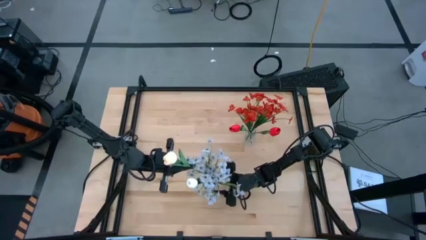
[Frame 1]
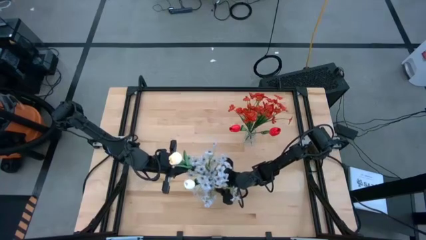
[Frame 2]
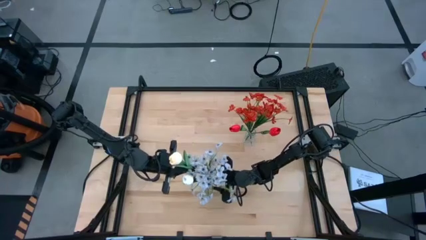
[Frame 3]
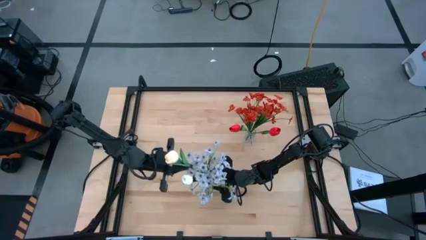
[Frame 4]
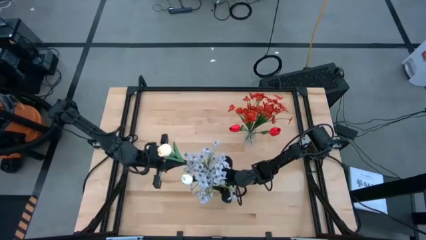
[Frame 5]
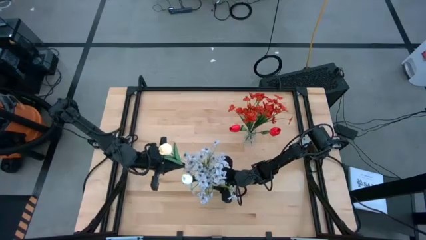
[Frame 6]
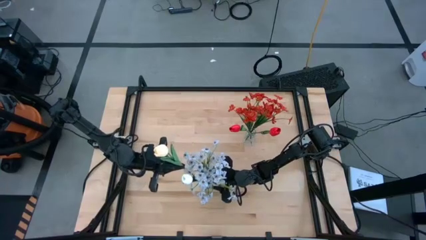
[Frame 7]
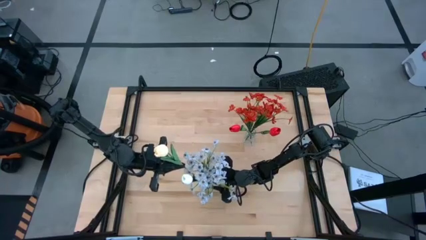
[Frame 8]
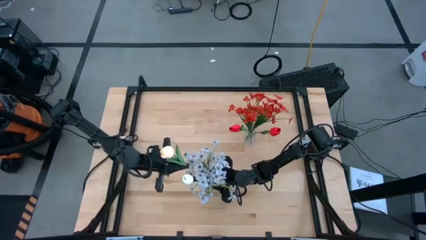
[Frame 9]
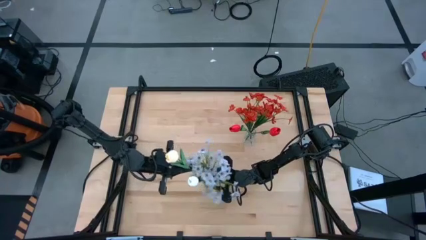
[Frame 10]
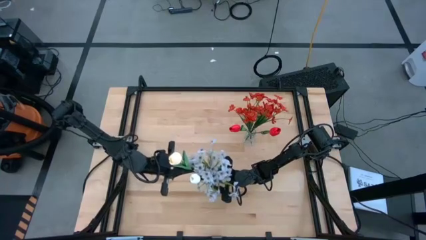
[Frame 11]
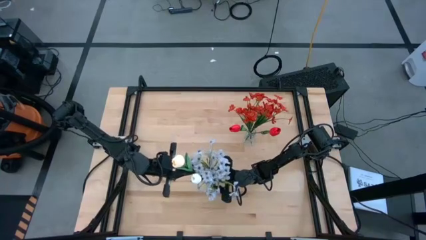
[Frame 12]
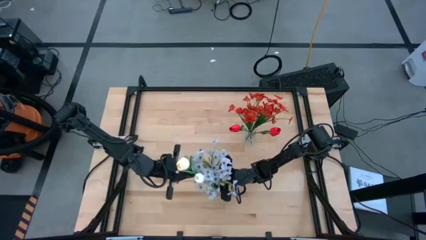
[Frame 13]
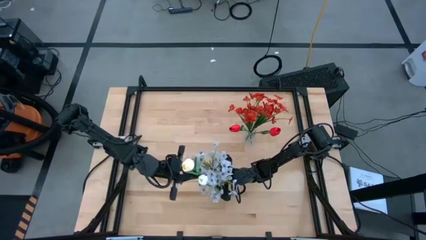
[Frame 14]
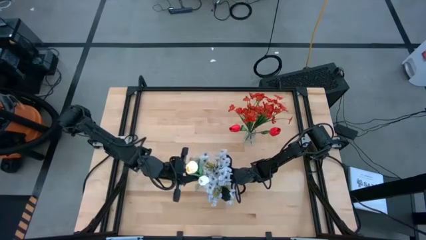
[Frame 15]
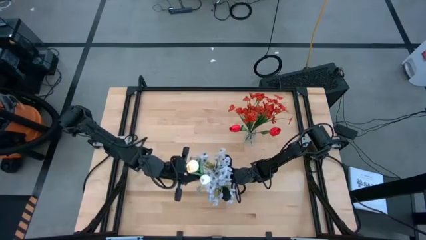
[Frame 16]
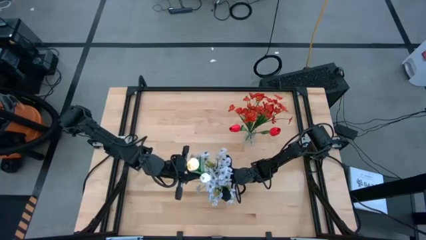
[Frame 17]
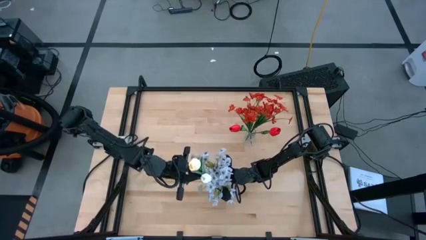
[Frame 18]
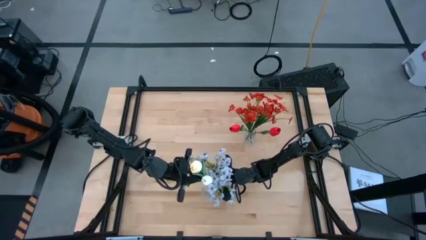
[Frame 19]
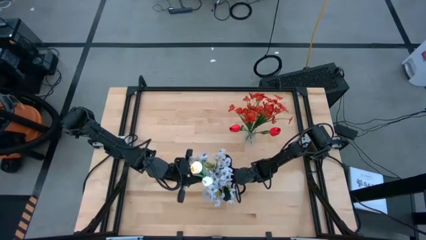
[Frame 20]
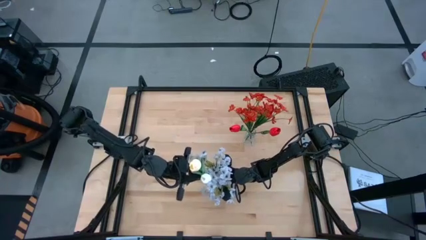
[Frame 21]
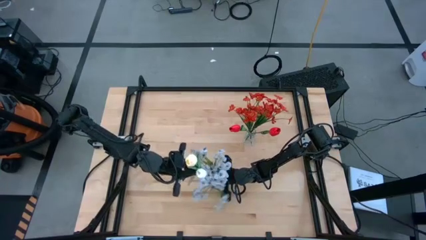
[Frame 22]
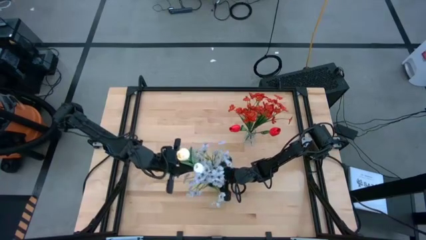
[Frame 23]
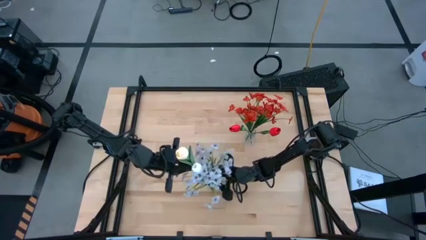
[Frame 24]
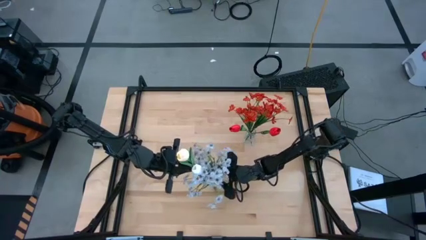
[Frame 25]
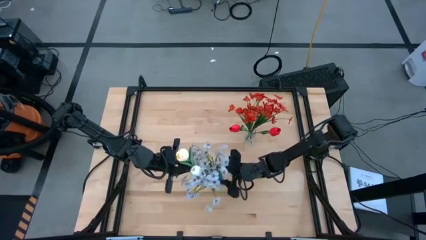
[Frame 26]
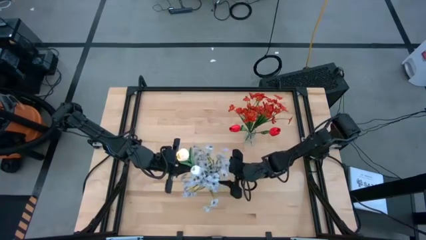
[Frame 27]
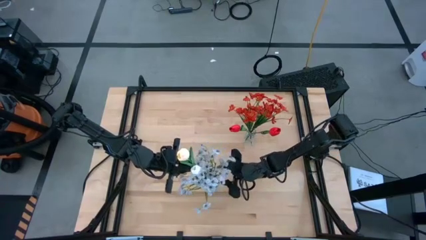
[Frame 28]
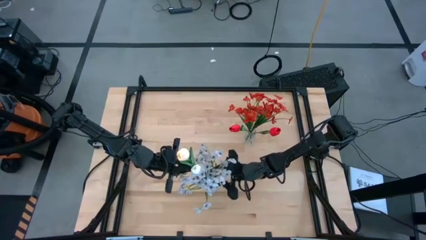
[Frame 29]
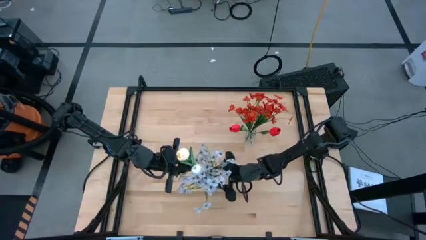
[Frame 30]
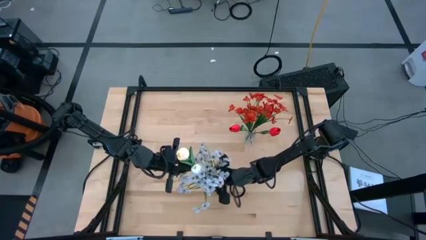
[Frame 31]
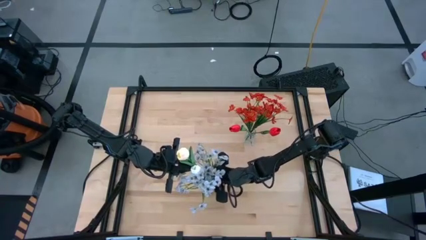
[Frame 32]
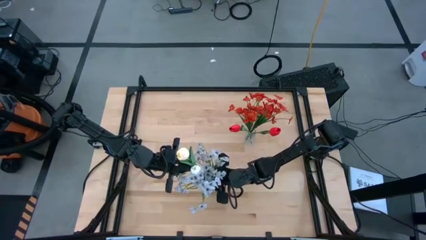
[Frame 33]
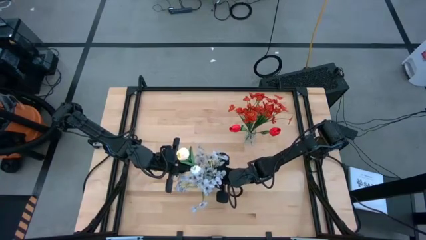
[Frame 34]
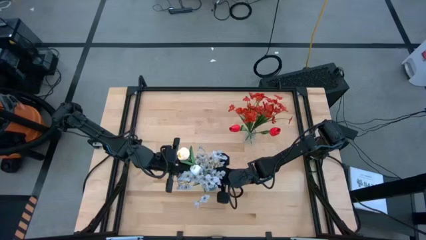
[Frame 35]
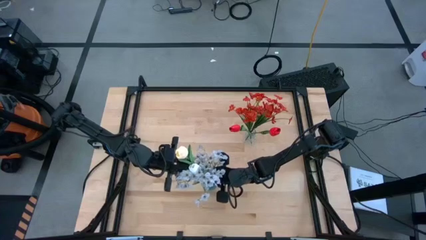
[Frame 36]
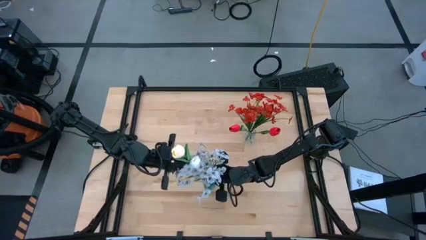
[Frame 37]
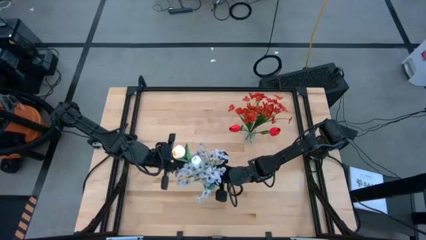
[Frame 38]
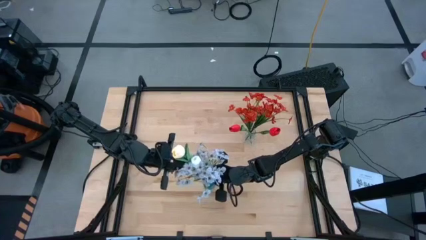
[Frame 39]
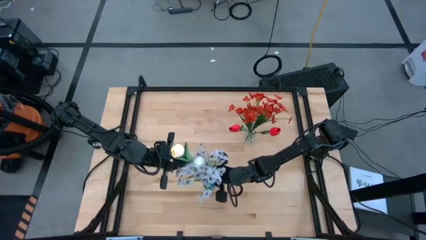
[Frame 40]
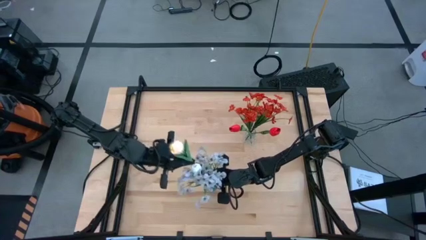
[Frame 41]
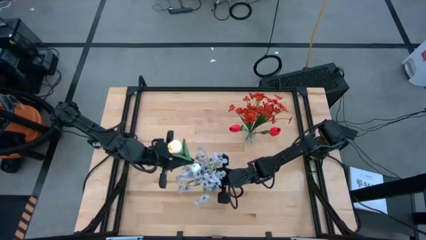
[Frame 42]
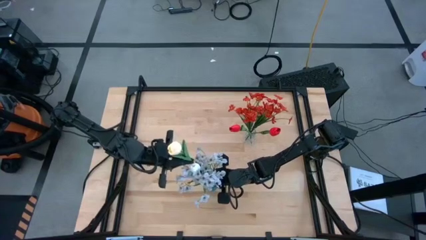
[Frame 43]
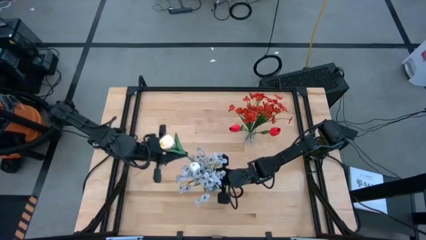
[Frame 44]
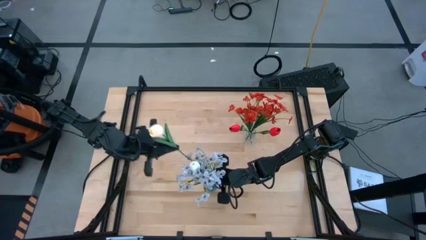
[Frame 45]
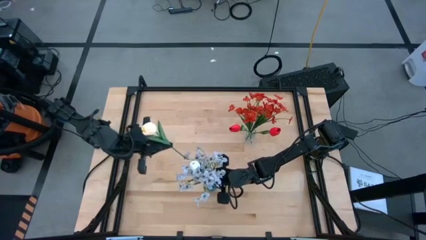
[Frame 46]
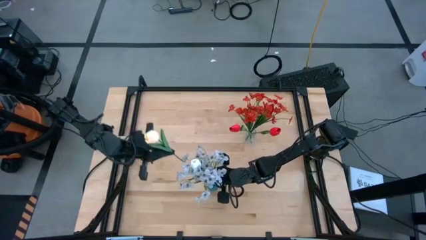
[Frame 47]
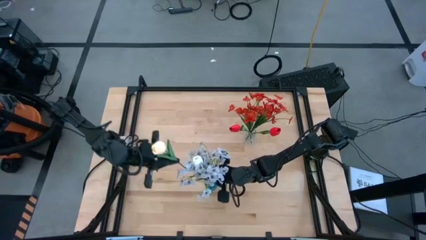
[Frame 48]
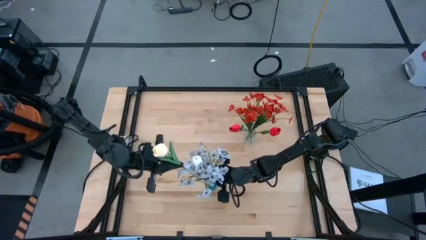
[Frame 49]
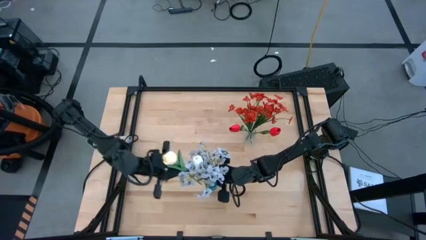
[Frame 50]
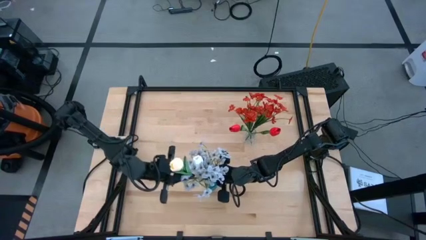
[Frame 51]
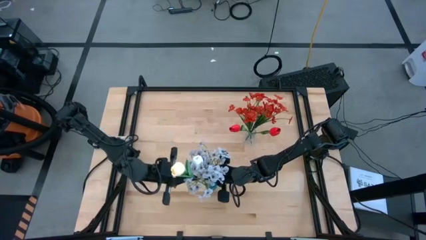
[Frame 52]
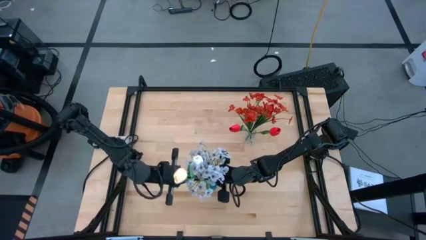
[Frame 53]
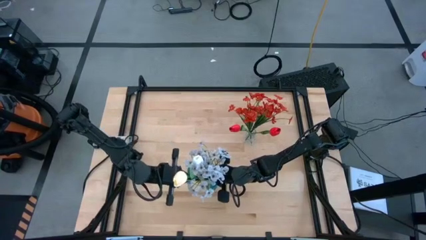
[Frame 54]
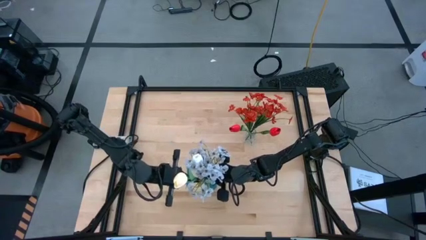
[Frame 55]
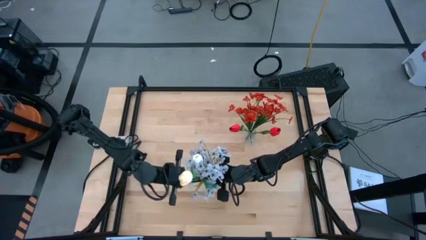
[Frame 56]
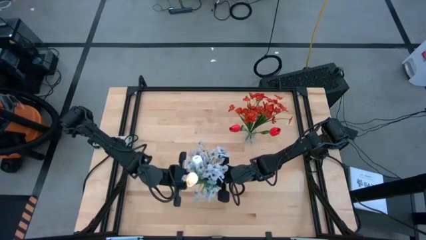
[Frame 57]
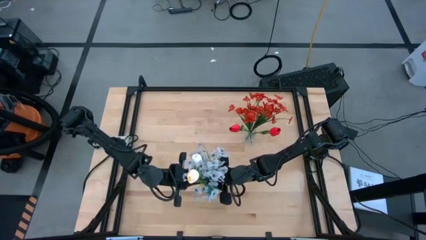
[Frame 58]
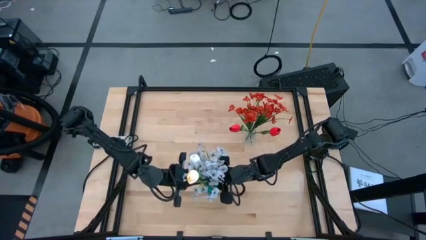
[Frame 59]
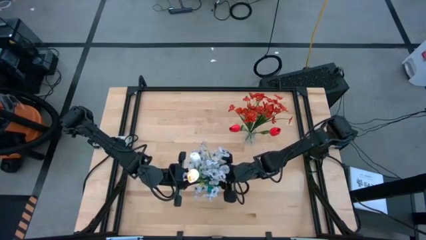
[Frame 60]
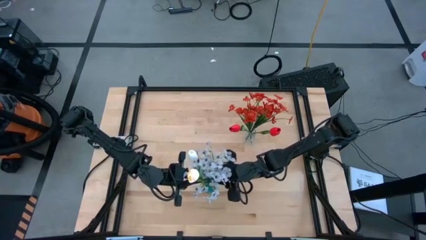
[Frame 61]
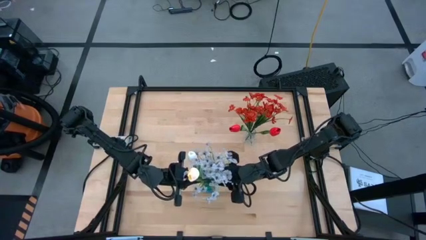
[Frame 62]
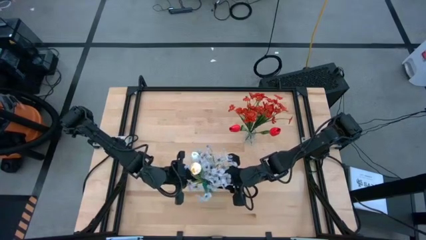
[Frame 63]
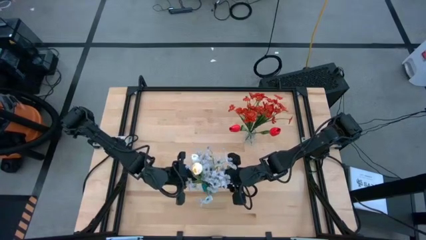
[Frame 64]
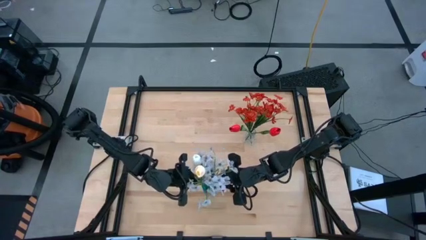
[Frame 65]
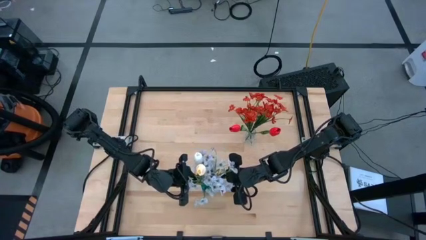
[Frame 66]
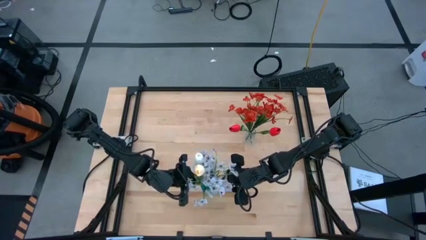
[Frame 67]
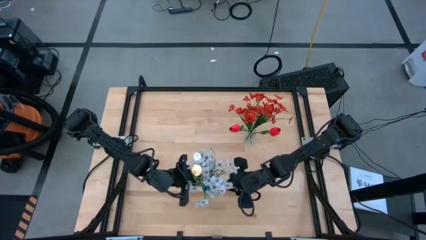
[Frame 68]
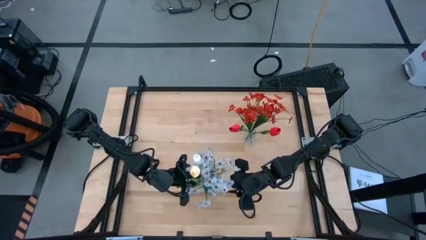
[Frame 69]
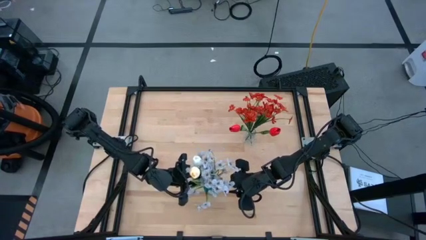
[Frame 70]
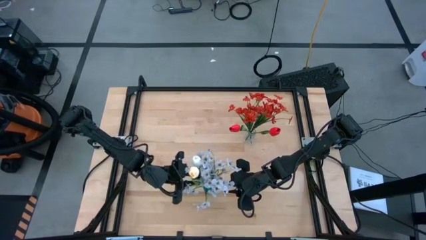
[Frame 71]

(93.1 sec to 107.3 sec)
Task: Sort flowers into vase by color
Put the yellow flower into the blue flower vase

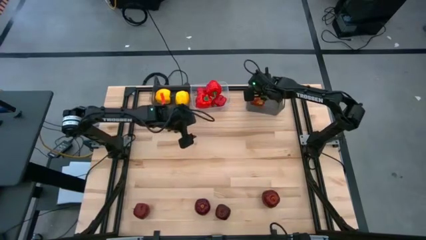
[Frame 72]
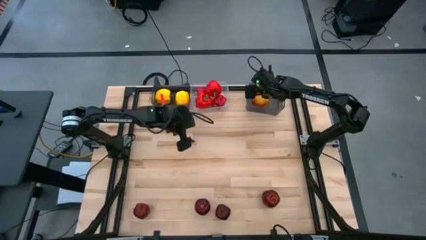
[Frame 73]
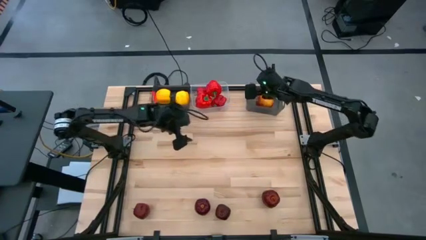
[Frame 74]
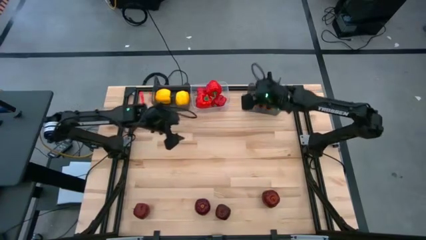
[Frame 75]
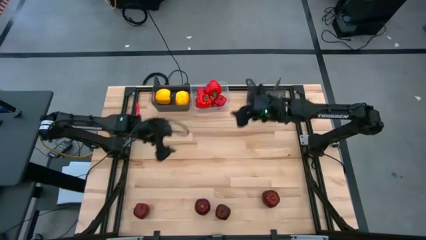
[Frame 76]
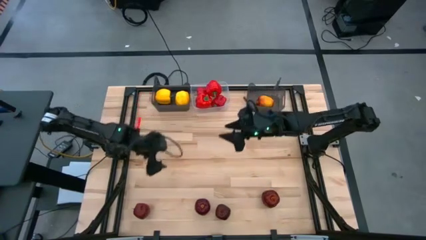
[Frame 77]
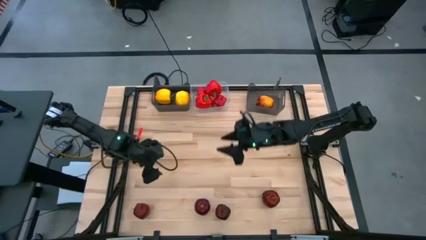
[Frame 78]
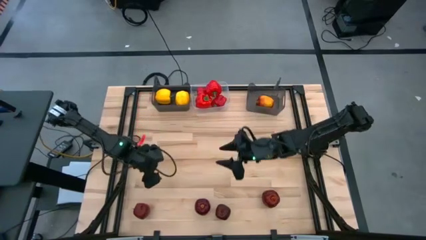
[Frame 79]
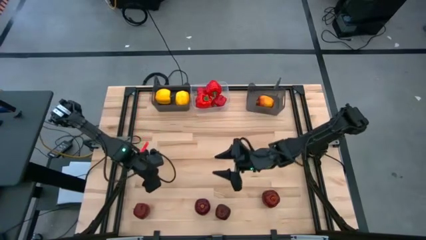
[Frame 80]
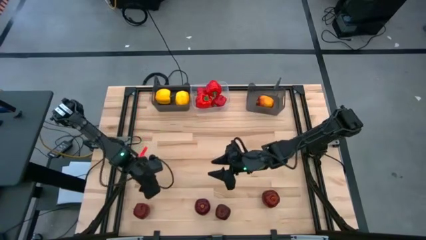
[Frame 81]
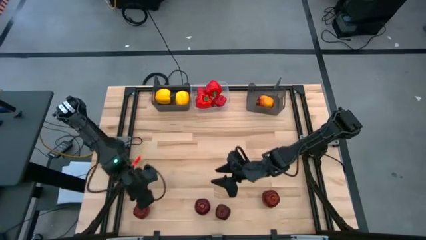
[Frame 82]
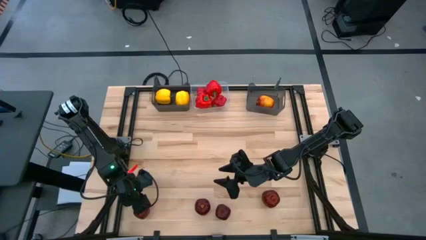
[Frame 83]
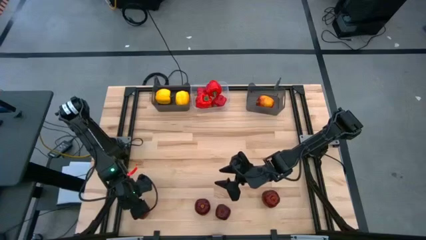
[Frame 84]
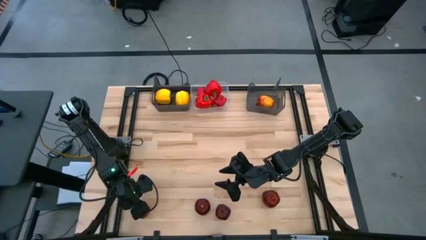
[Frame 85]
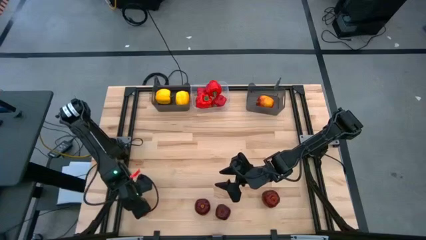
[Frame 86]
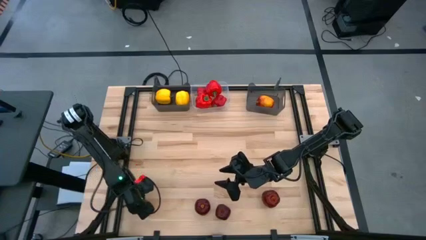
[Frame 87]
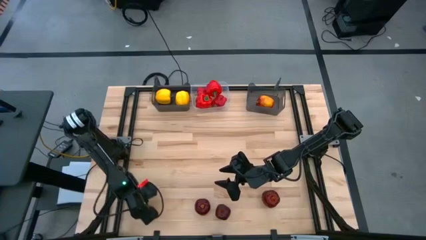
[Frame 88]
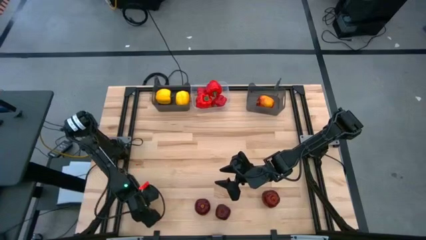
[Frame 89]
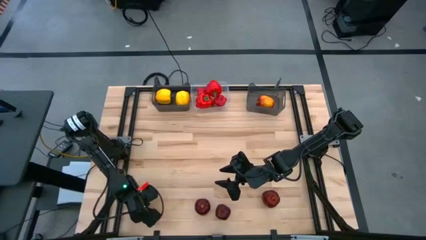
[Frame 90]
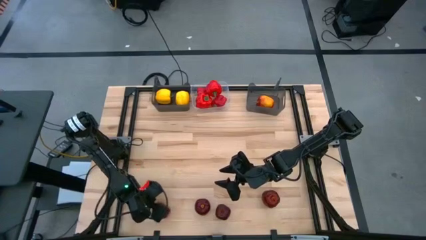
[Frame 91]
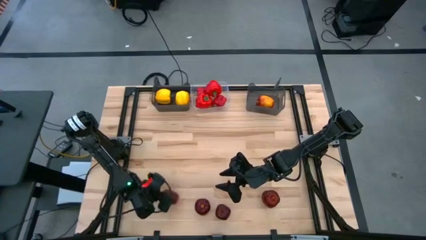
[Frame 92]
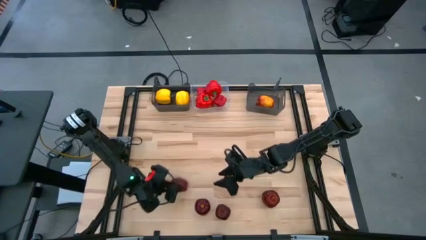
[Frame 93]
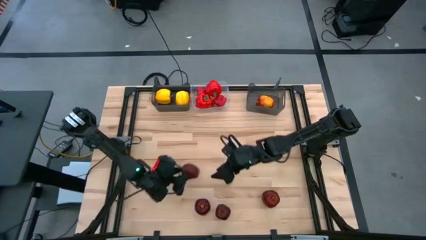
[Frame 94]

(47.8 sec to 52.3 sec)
Task: Sort produce into baskets
Put the left red apple into the right black bin
